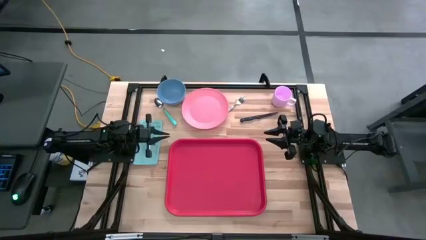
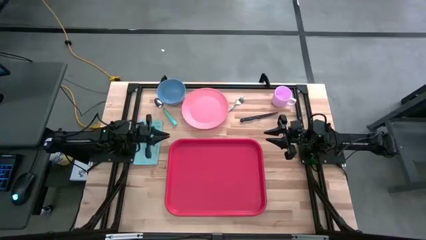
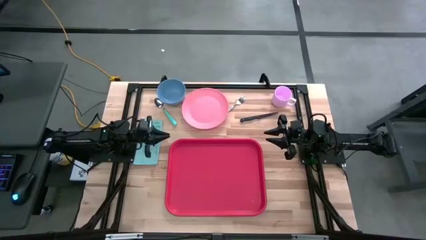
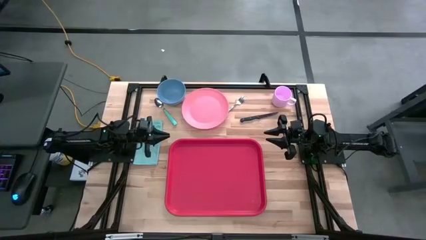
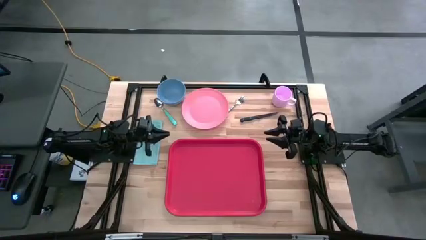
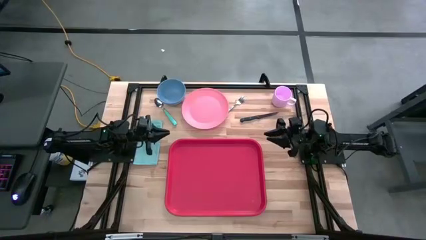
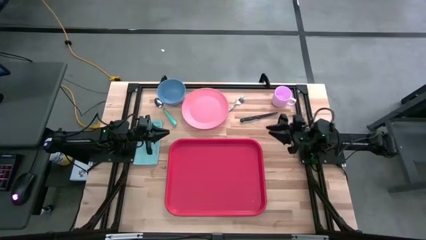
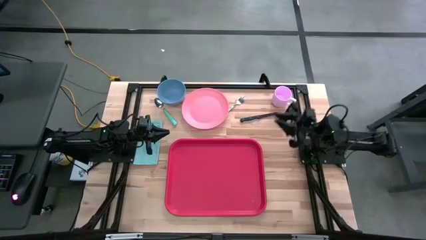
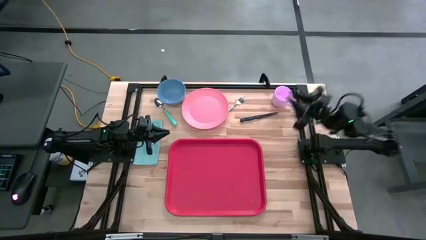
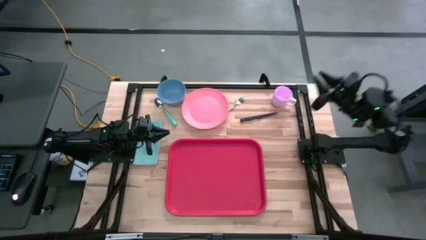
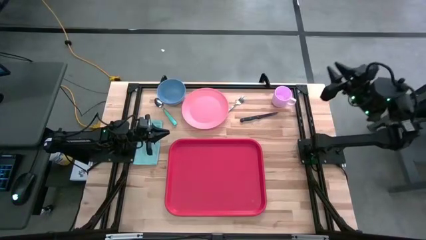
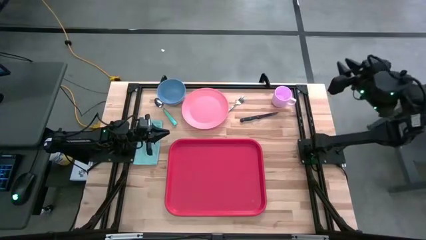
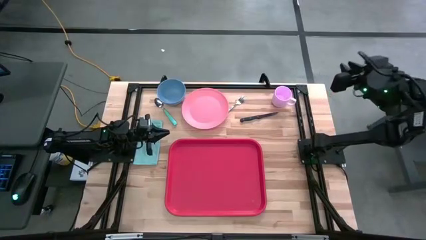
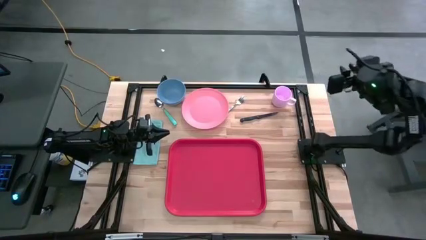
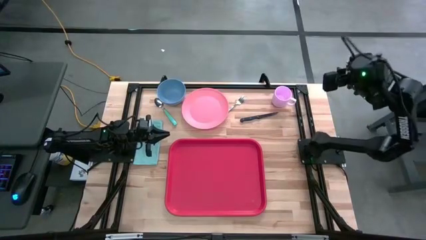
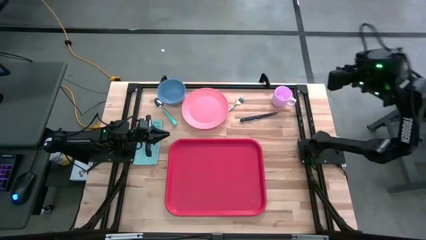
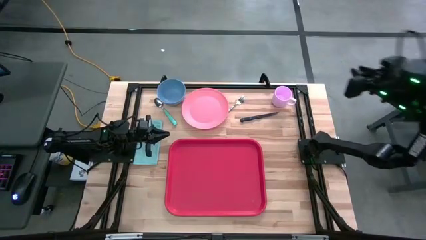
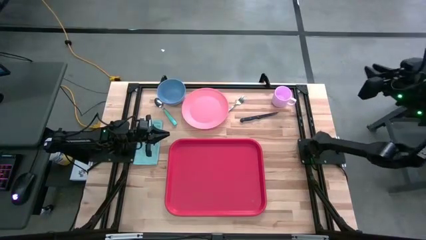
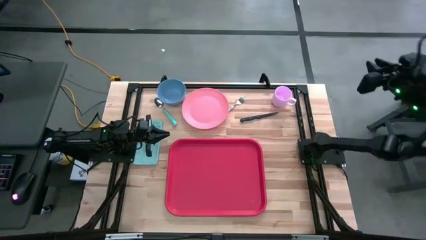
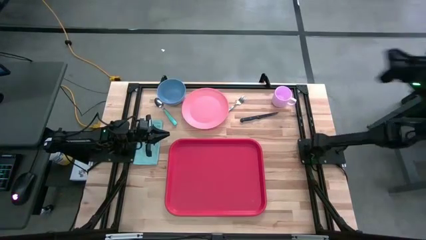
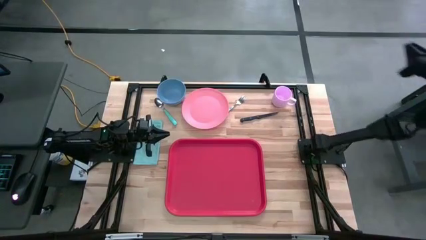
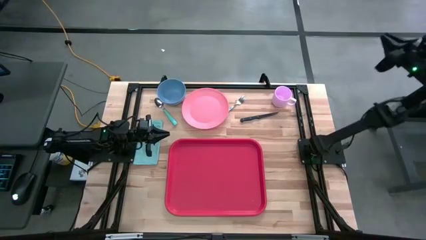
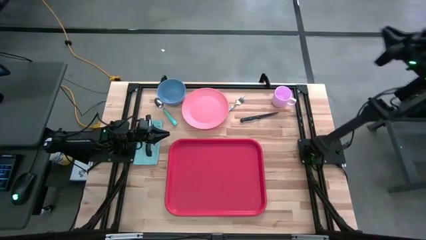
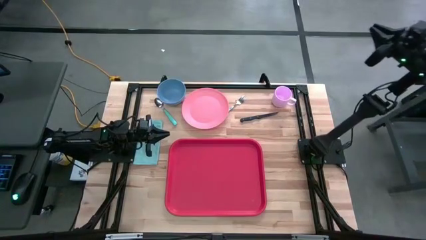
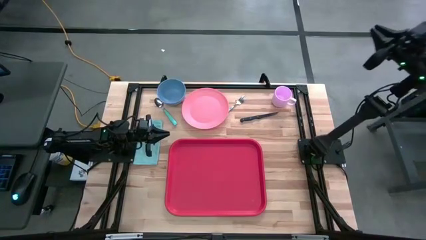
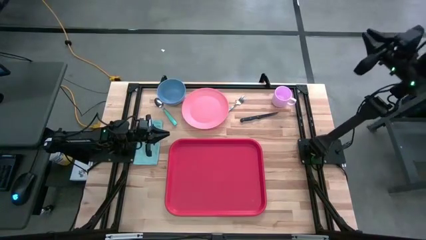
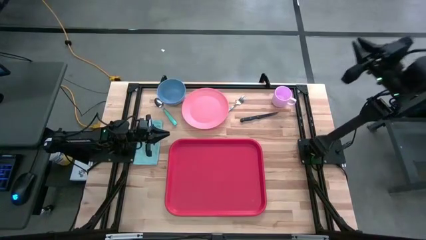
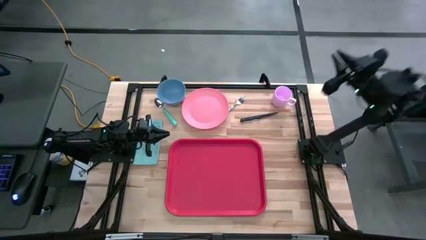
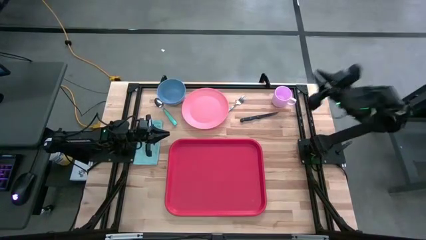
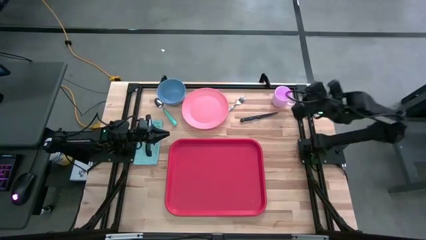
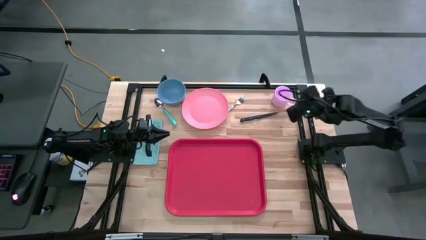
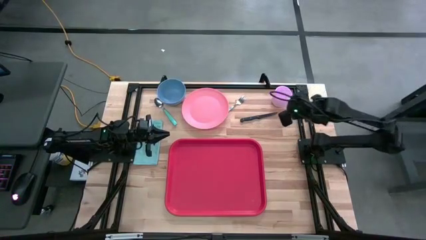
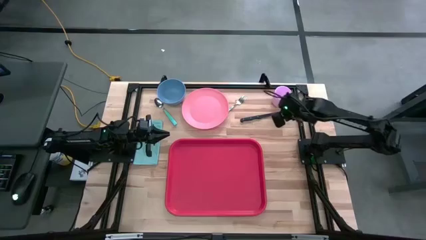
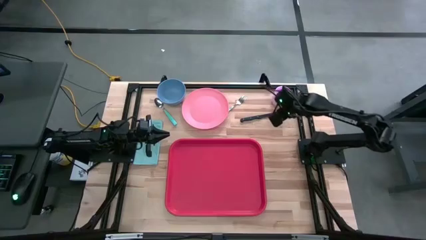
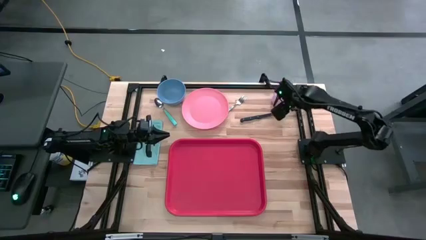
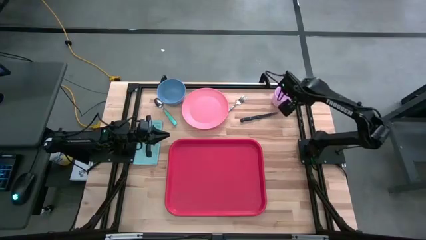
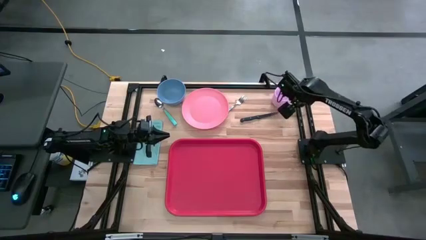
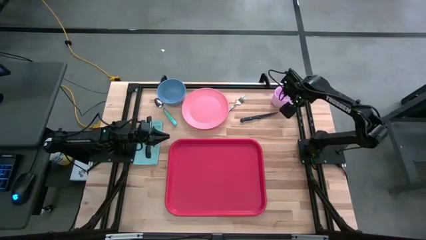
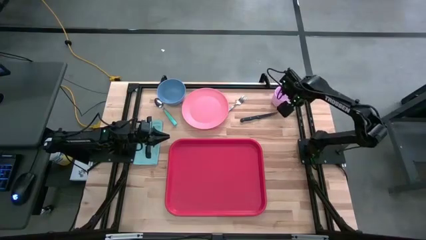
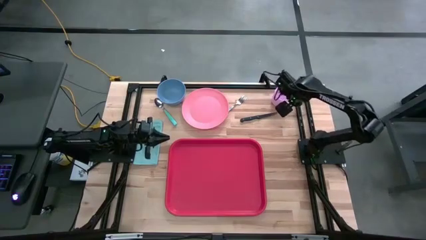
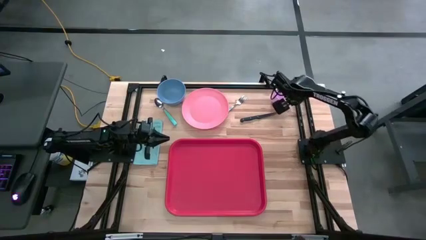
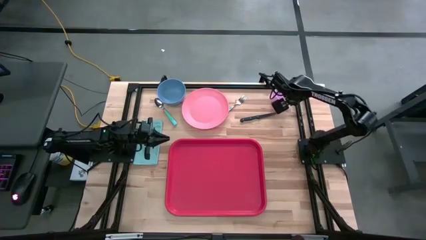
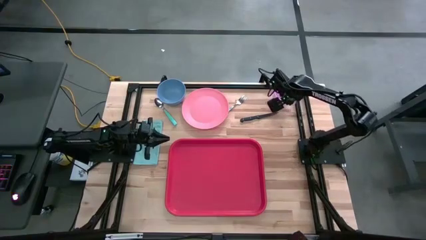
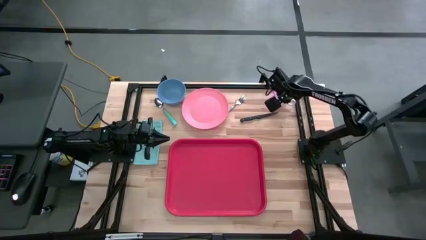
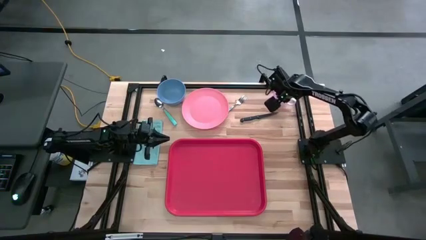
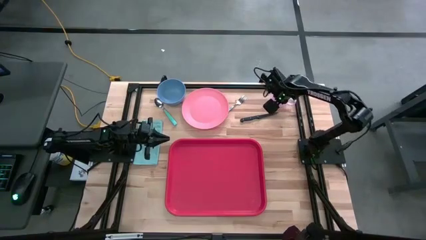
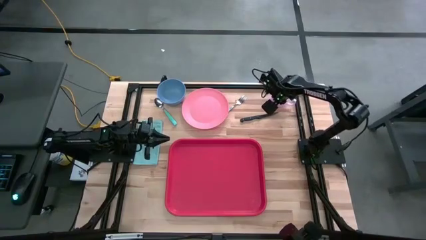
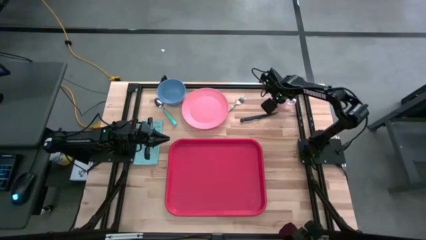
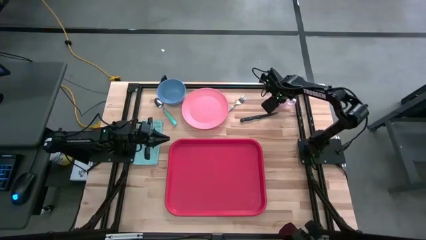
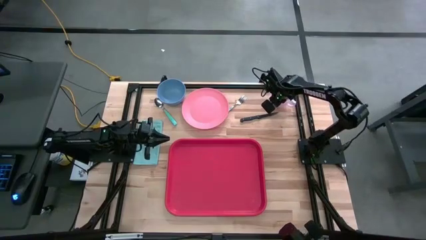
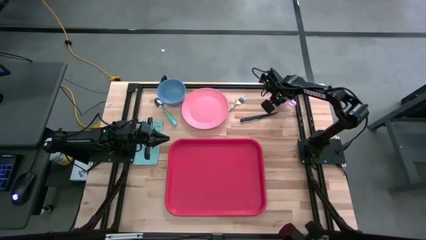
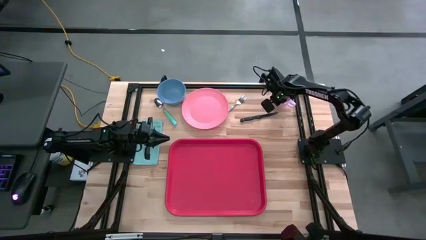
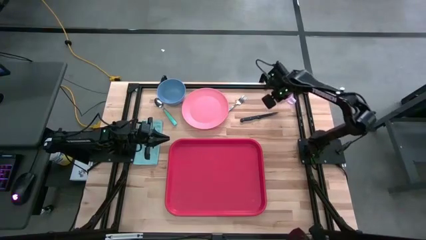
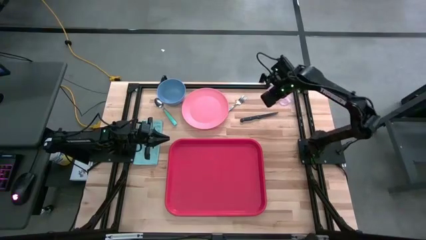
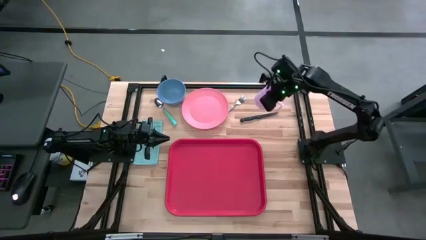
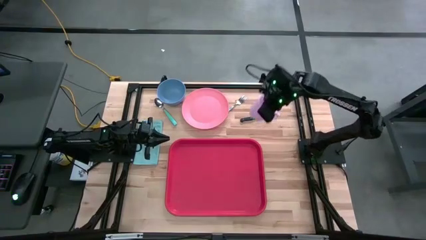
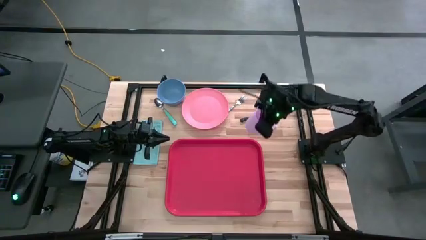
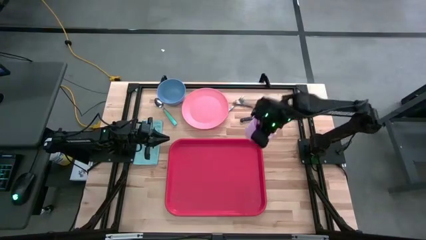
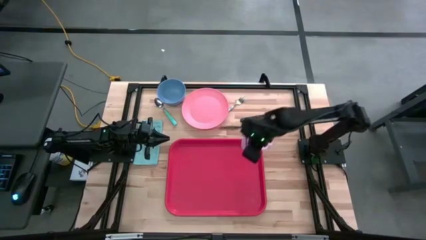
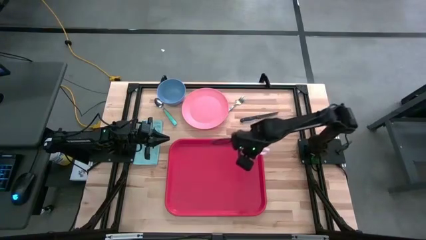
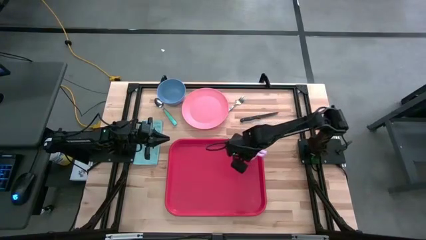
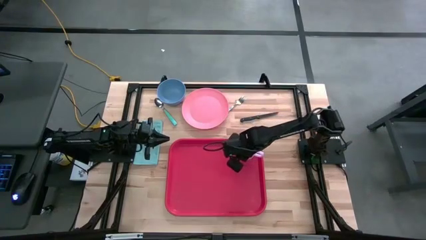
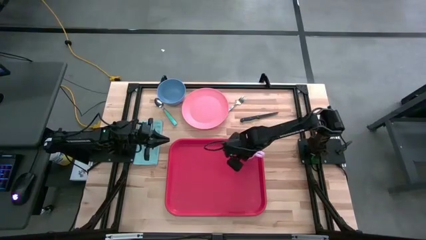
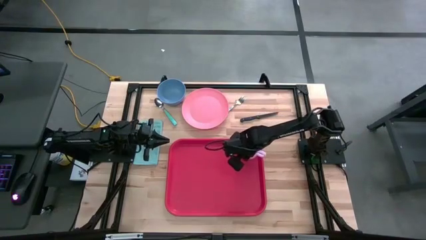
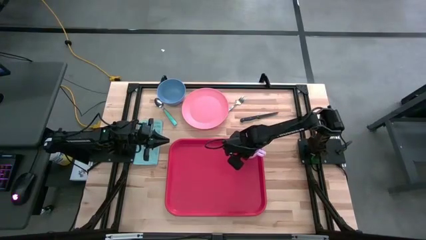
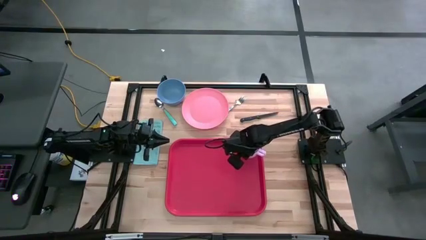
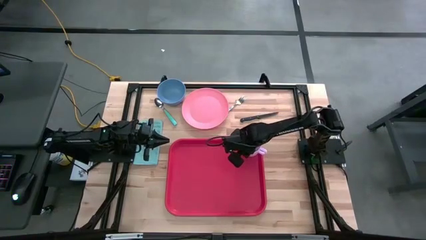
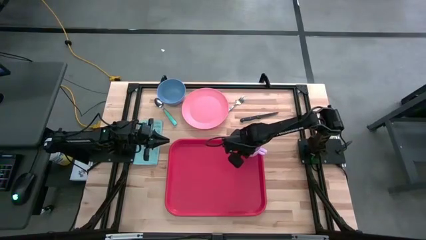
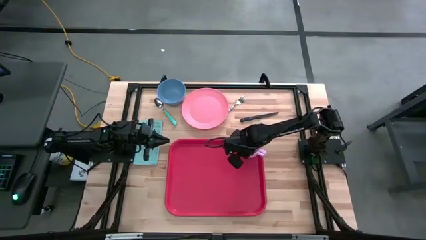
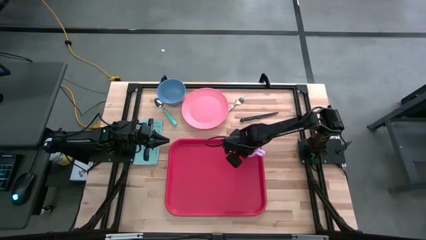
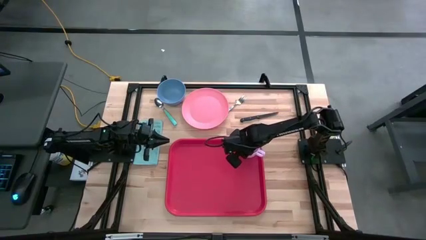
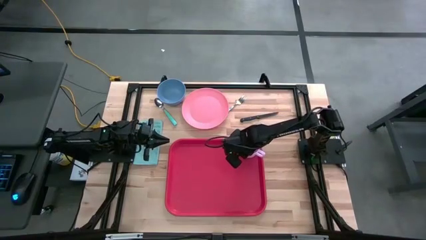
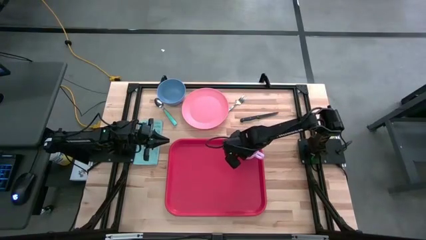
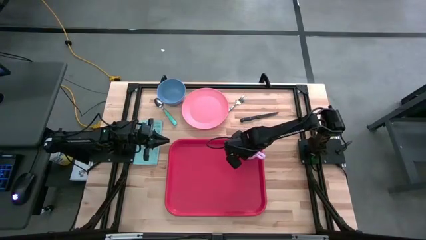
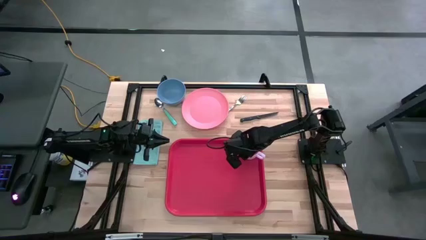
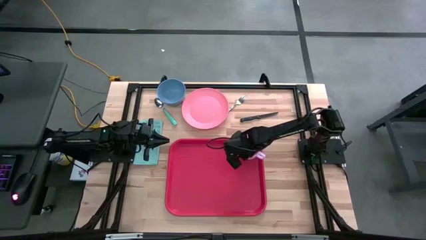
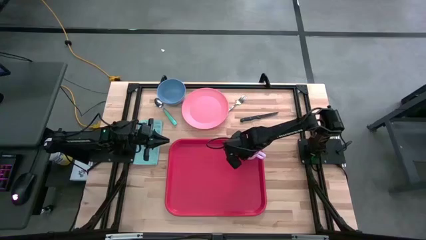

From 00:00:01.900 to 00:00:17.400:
Task: Set up tray
Put the purple mug on the red serving tray
